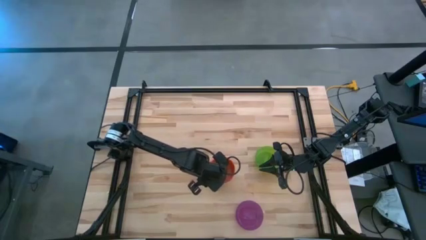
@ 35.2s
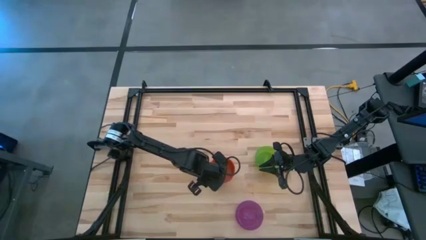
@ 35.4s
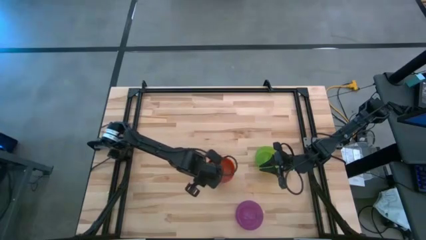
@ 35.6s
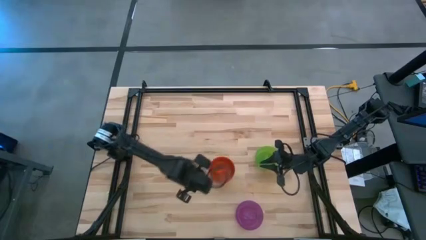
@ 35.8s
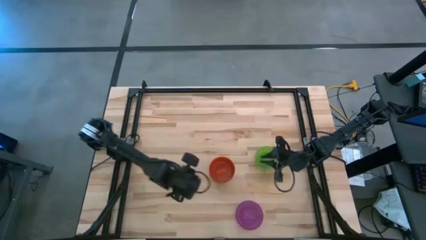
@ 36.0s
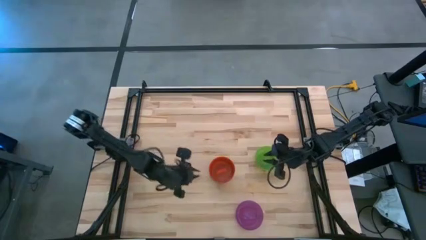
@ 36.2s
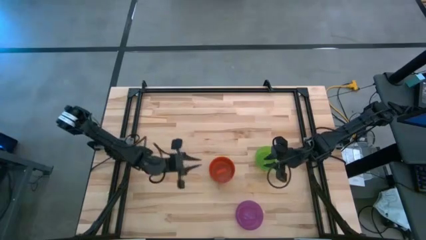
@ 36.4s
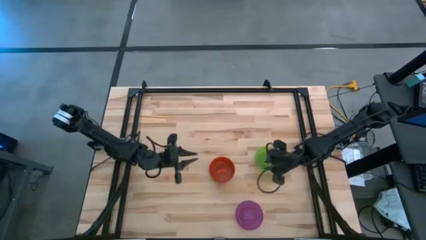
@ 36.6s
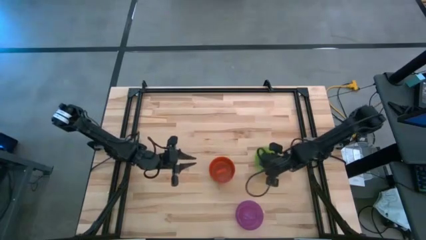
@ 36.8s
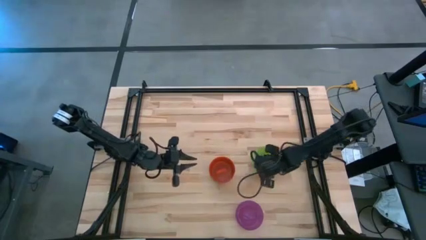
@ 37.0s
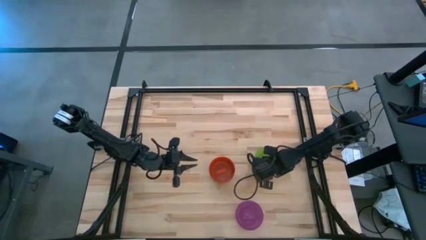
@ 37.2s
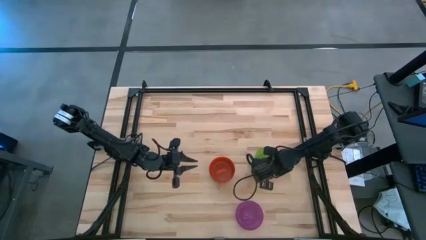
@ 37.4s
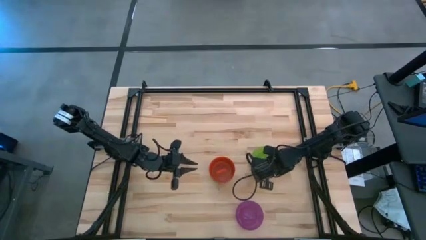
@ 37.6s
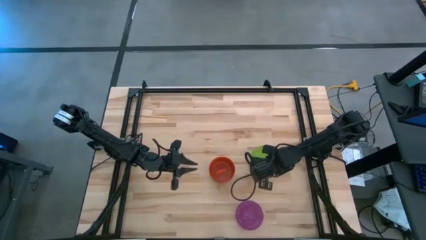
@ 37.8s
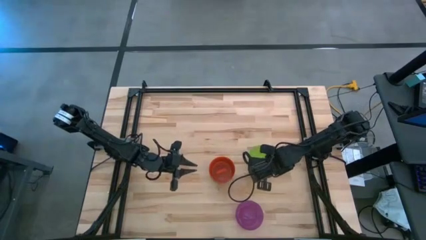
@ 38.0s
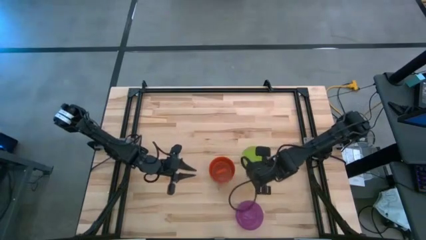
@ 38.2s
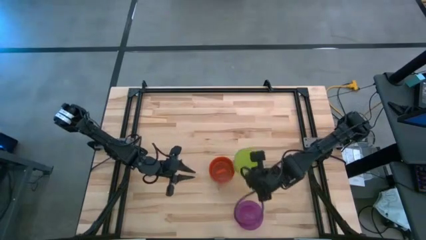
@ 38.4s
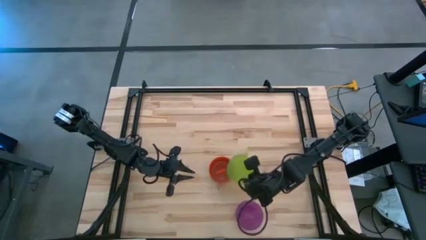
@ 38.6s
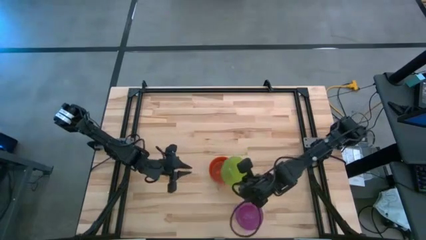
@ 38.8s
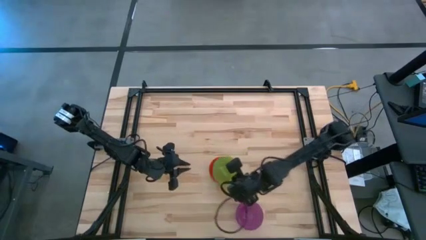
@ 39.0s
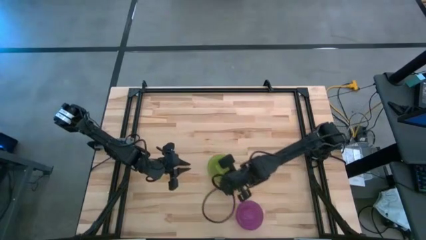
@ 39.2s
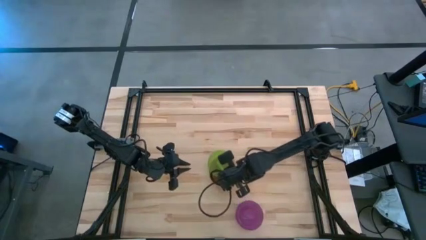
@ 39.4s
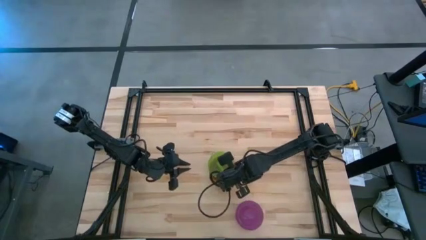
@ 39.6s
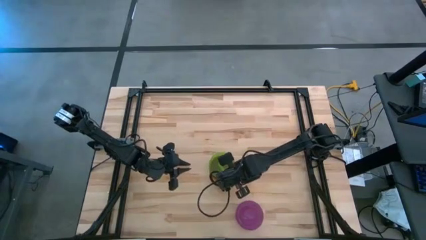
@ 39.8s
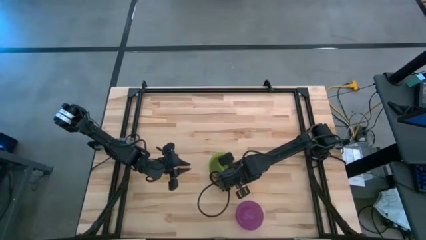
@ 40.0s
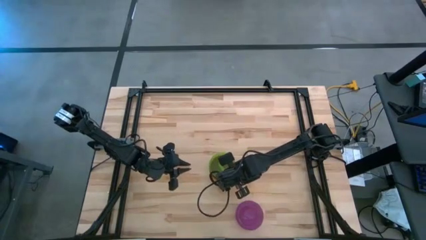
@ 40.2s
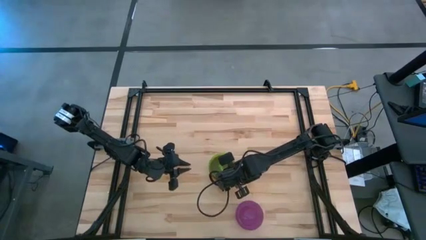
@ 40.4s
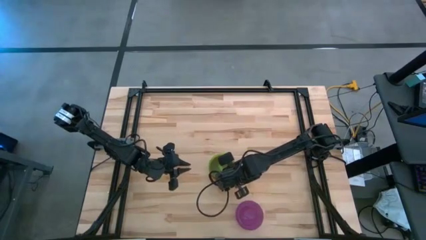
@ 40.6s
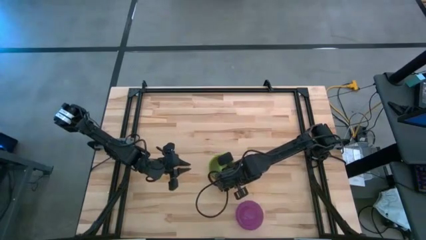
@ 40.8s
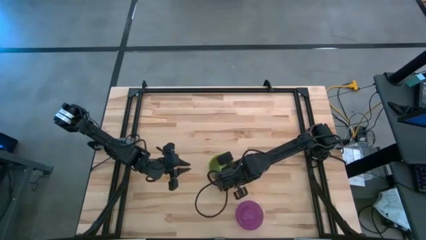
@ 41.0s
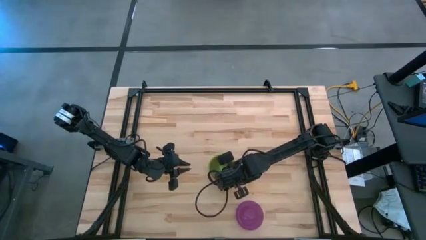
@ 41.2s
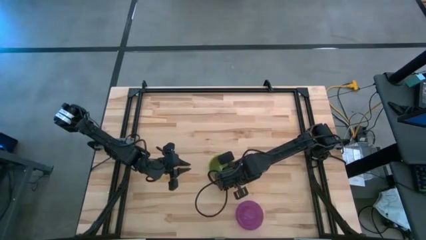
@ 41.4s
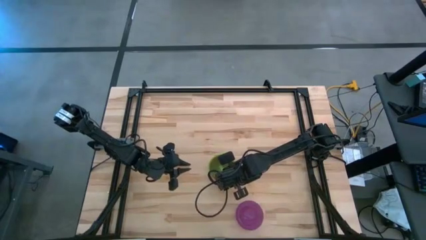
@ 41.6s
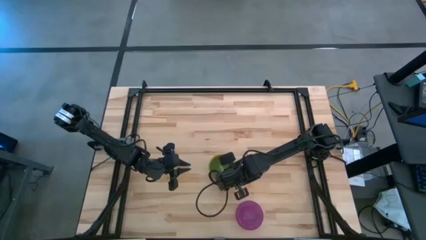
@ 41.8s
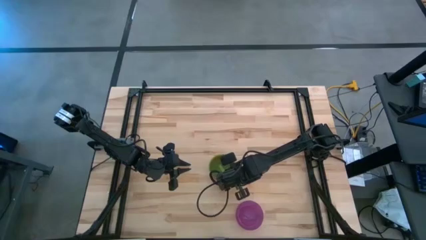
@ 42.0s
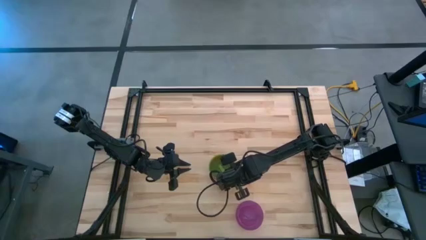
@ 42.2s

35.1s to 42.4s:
Task: Nest bowls inside each other
Stack the green bowl on the orange bowl

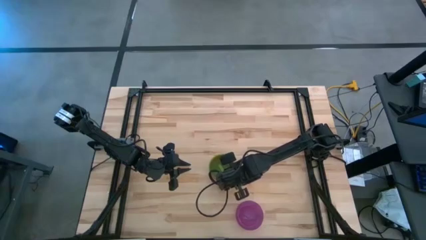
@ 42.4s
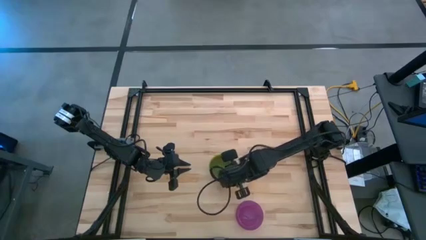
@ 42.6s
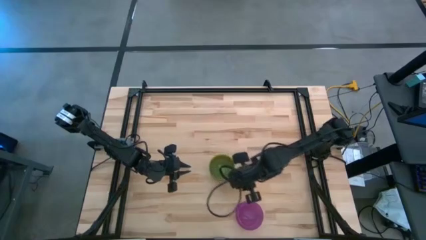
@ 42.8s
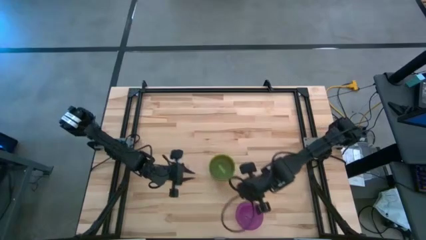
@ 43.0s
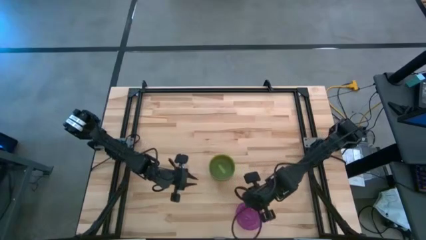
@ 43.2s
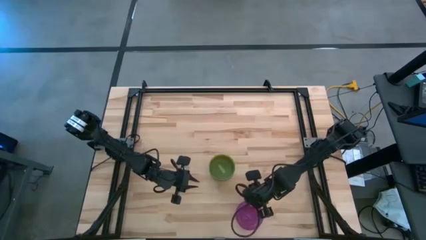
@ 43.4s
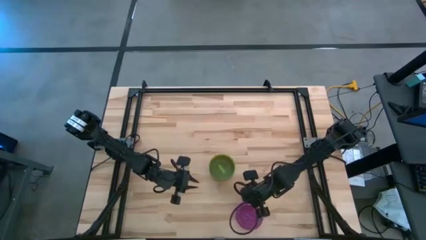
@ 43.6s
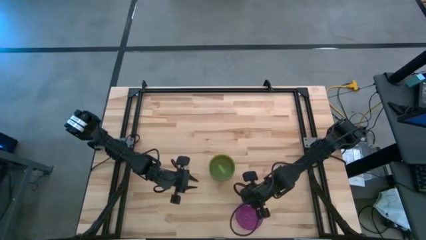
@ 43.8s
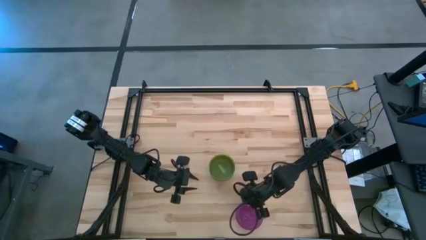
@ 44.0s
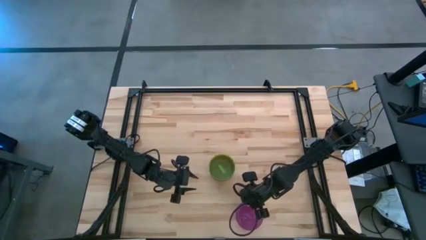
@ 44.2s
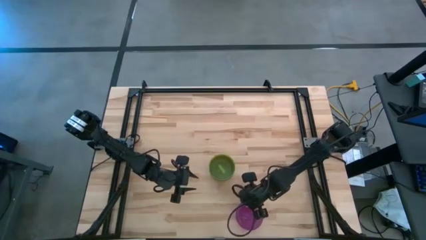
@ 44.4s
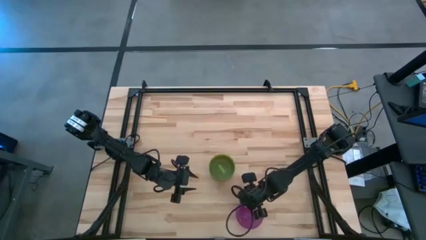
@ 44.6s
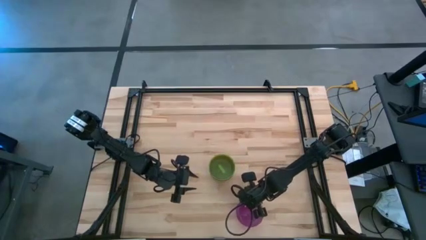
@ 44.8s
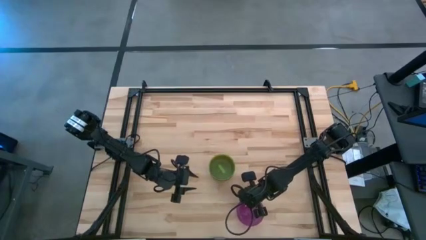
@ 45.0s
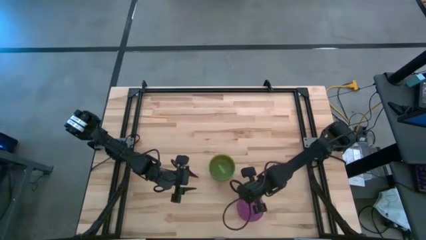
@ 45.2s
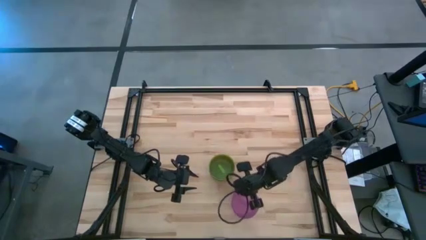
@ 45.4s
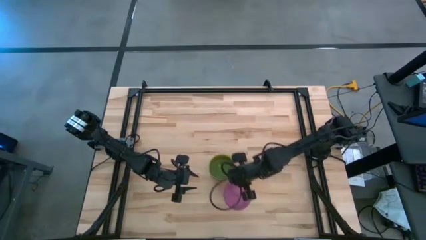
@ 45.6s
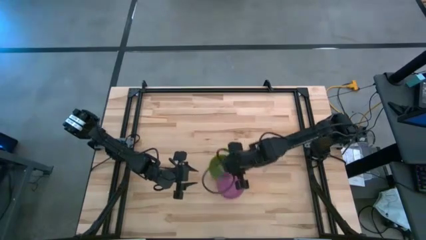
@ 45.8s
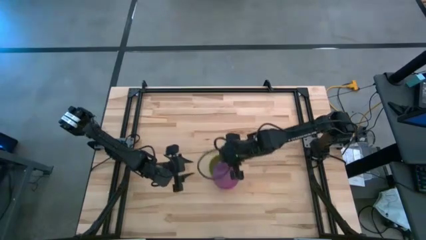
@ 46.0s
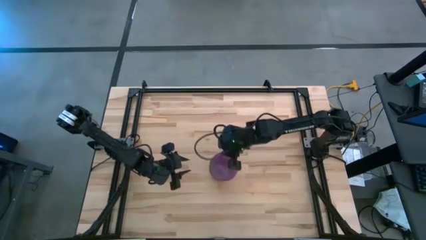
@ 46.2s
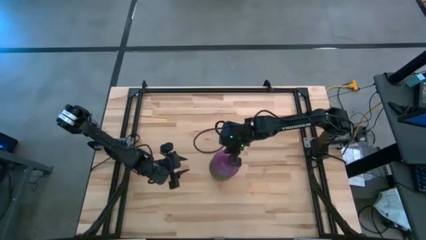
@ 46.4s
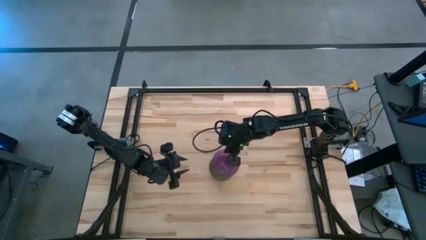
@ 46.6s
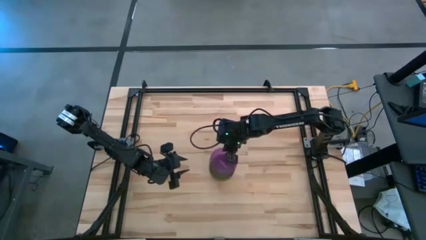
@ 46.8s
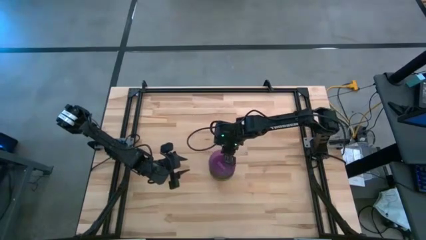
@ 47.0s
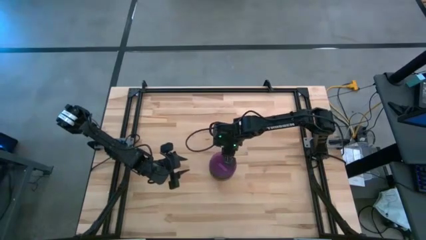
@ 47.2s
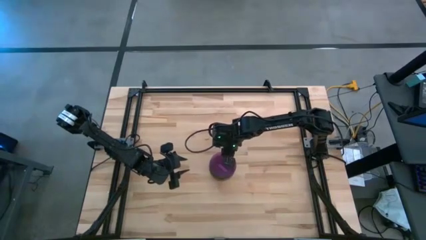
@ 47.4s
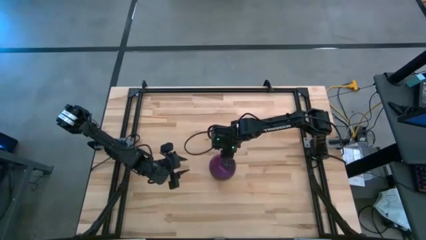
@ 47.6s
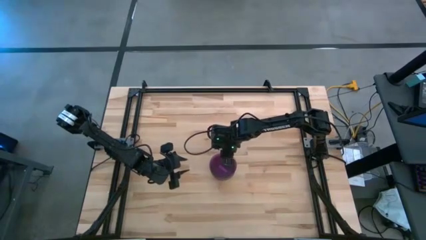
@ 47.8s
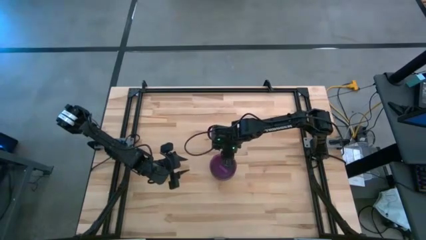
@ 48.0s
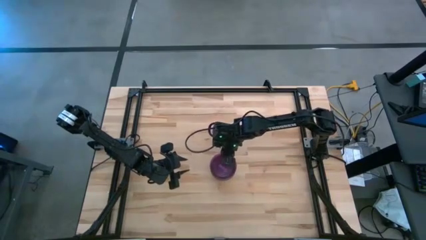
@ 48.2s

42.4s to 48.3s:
Stack the purple bowl on the green bowl

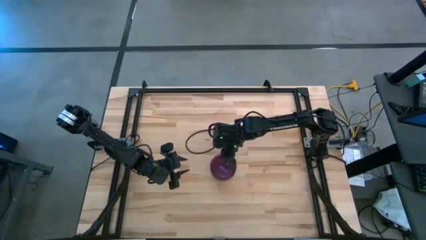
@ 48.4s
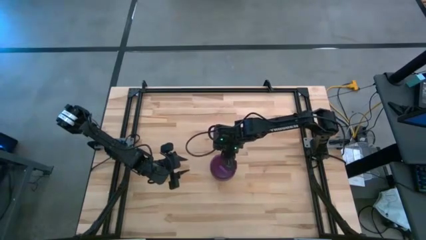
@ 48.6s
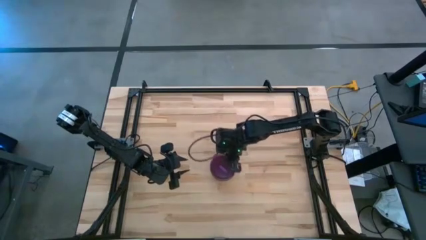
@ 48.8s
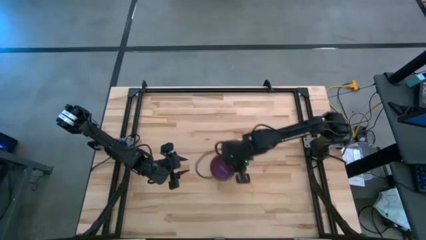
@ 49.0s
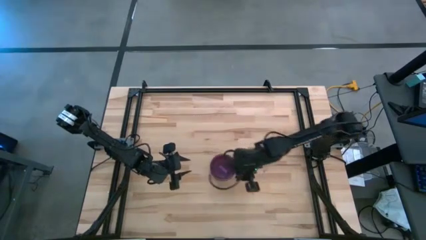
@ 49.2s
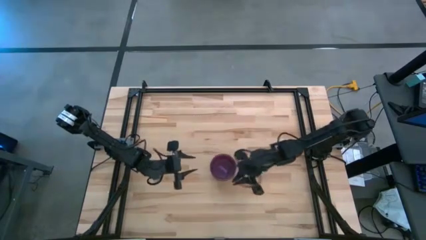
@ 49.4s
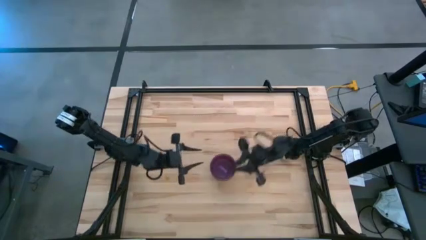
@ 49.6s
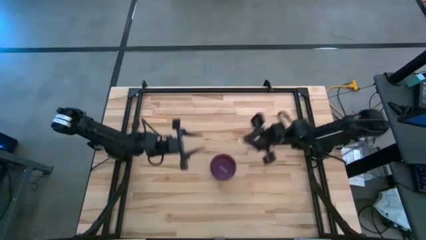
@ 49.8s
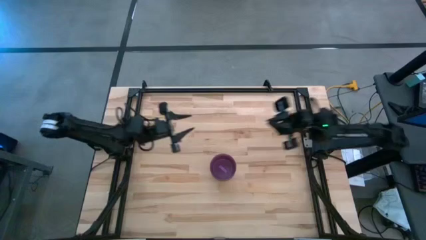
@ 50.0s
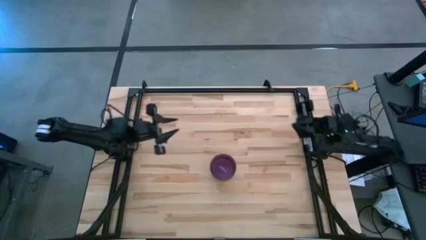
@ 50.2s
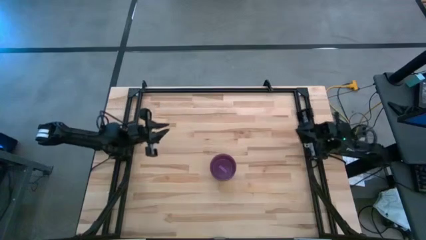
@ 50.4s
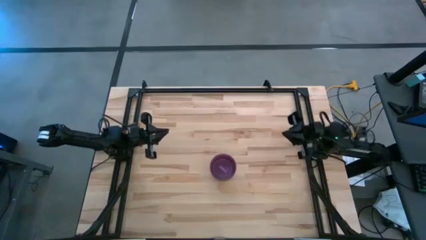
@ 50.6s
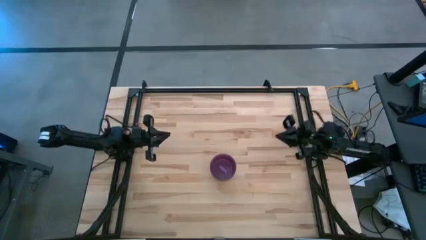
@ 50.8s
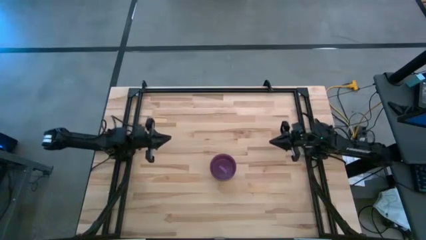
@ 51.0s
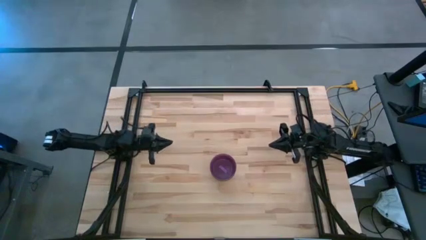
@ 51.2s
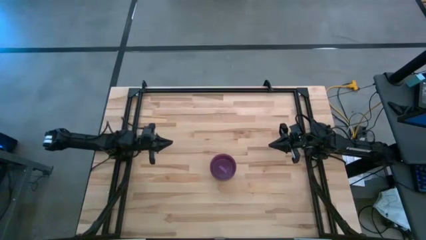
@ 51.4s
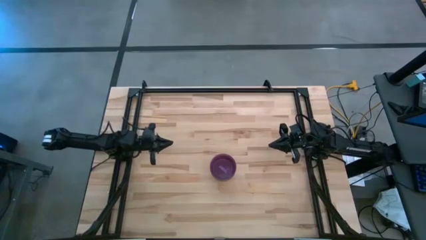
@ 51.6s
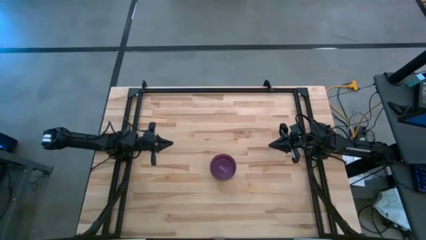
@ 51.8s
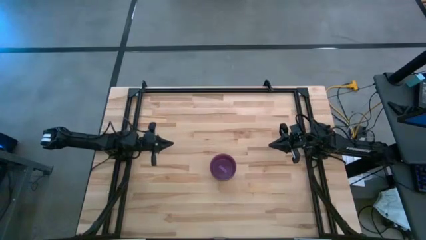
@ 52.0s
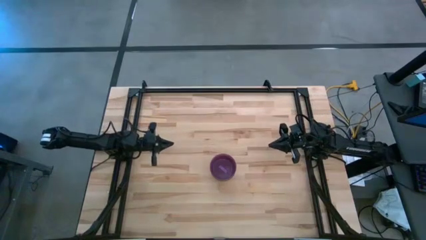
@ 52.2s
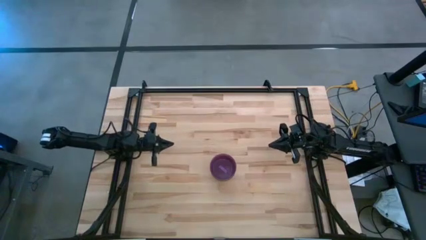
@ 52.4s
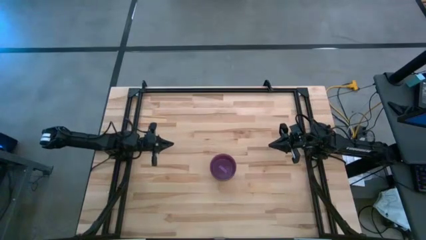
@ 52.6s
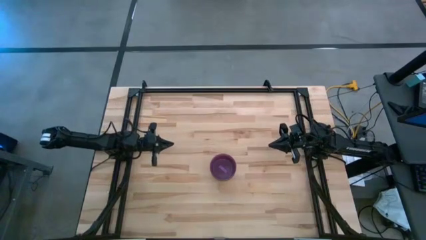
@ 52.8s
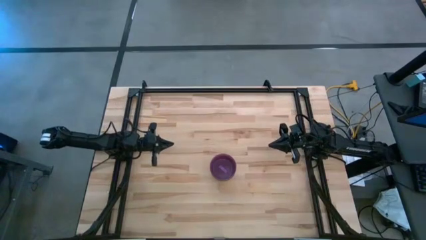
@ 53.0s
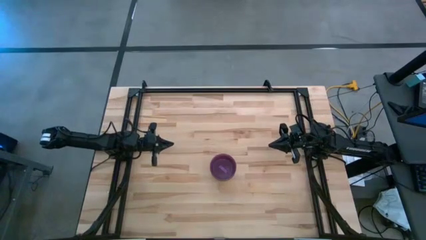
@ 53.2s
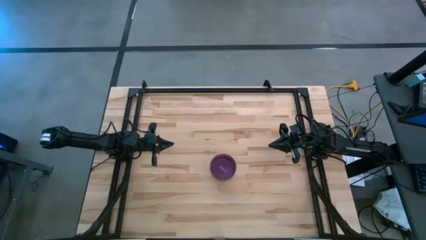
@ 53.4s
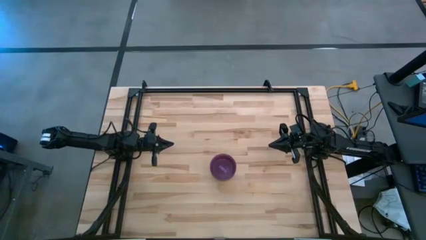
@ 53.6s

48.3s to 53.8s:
Return to Home Position
